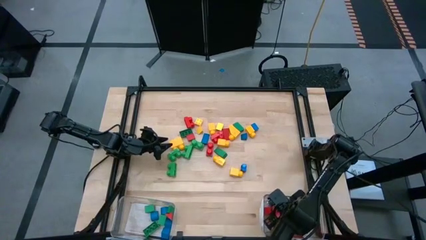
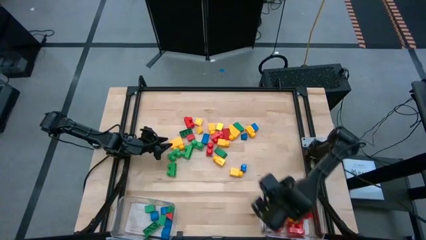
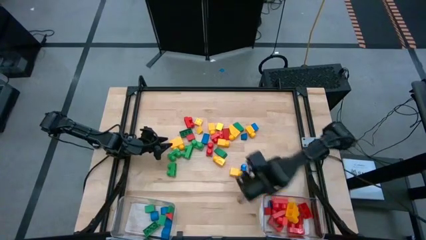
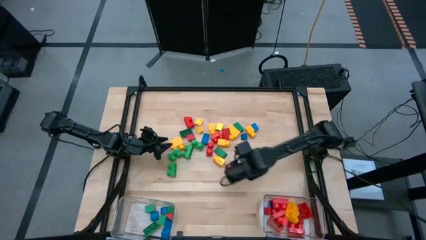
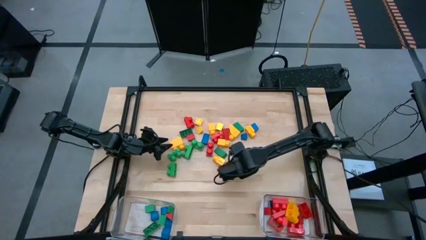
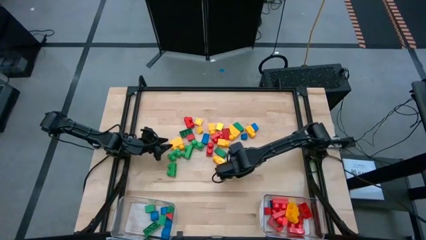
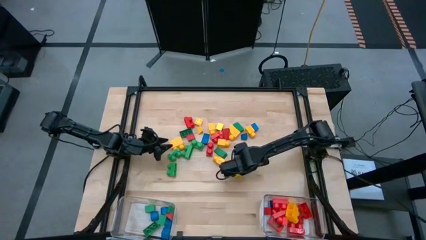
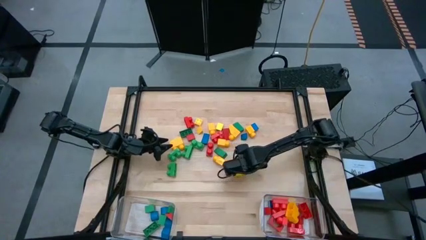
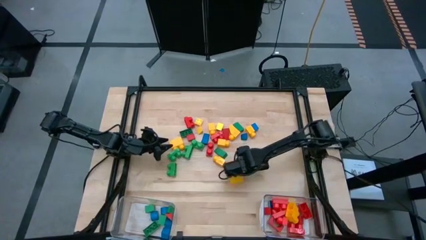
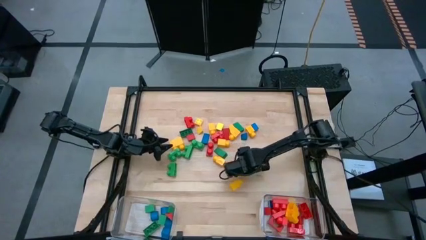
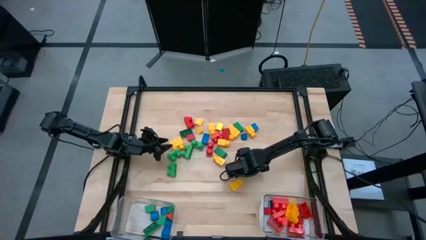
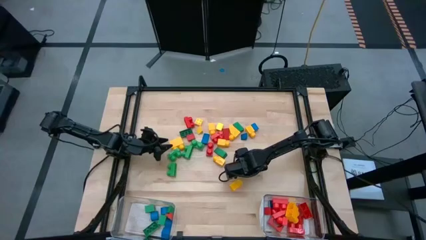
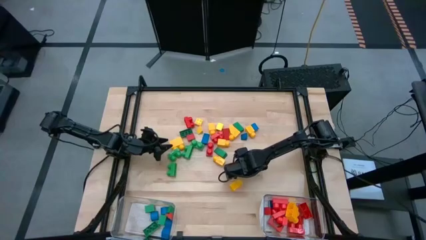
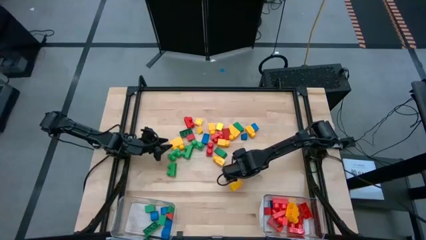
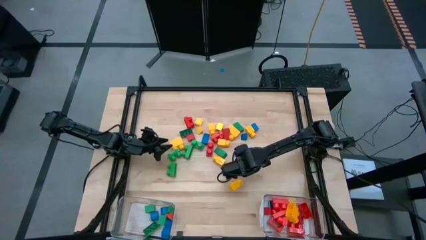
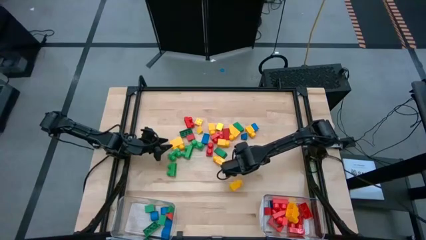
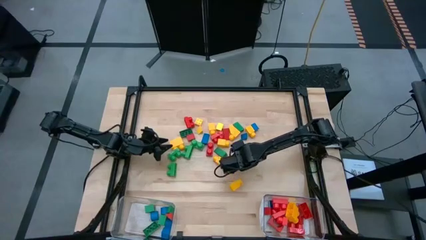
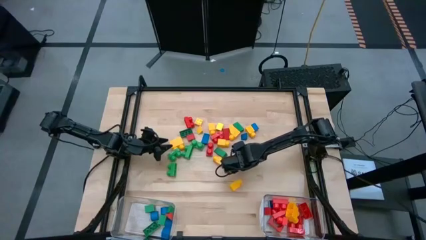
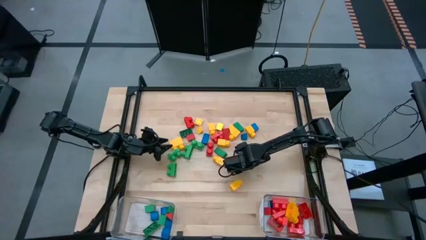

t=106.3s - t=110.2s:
Task: Sort blocks by size
Put the blue game piece into the left transparent bin

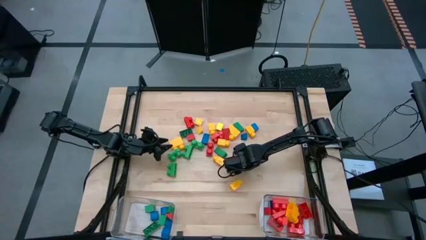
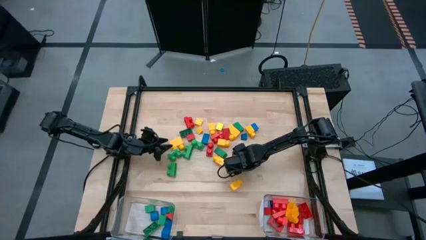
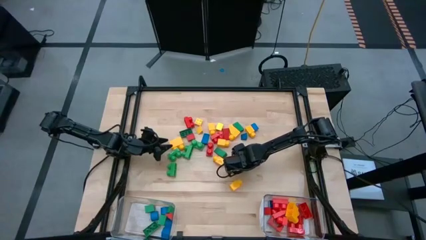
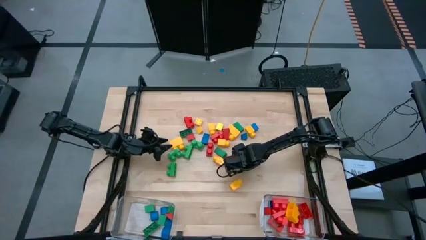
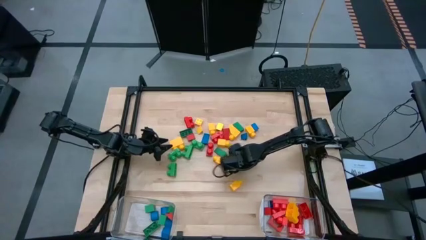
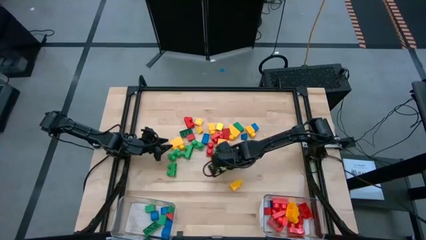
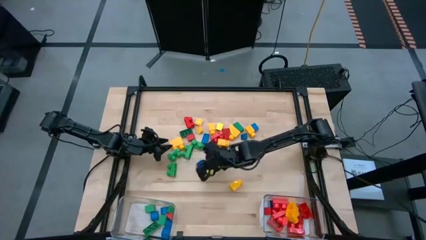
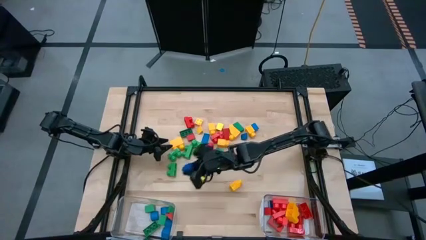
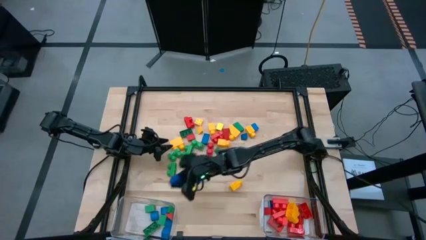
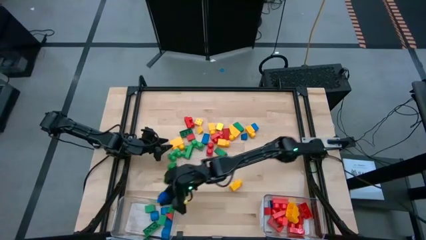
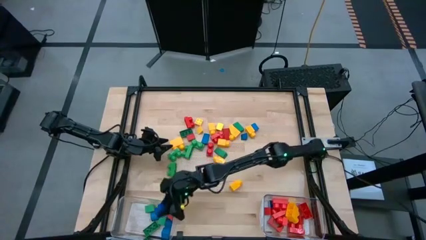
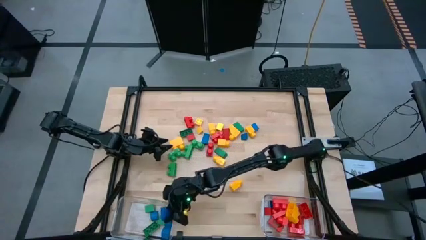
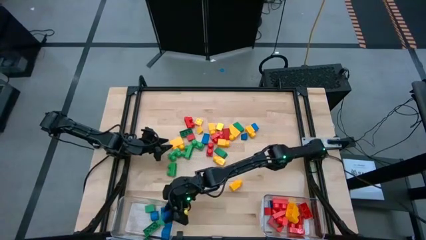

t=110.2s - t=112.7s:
Put the blue game piece into the left transparent bin

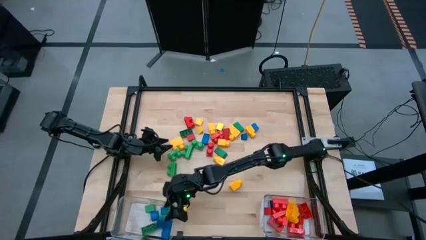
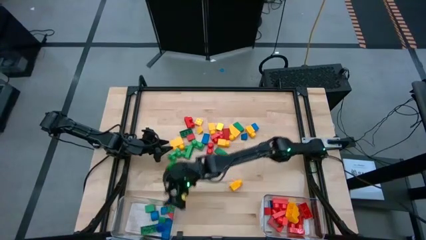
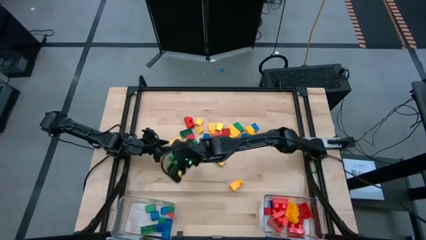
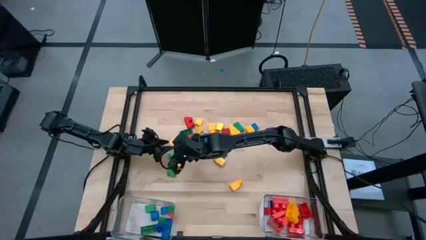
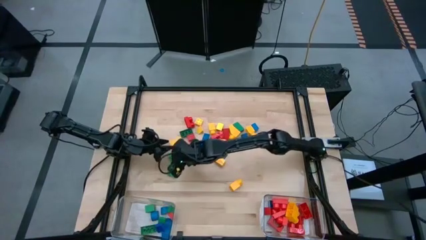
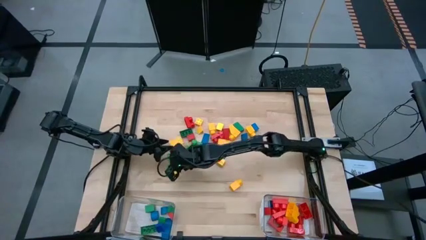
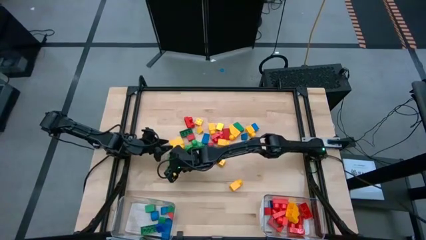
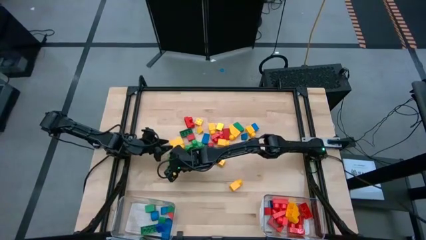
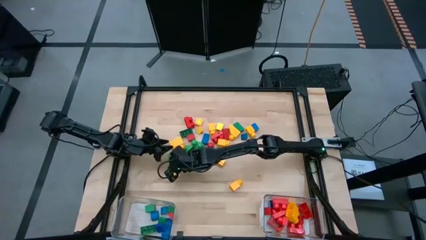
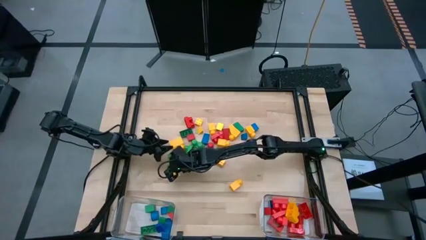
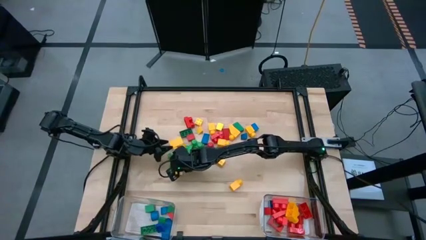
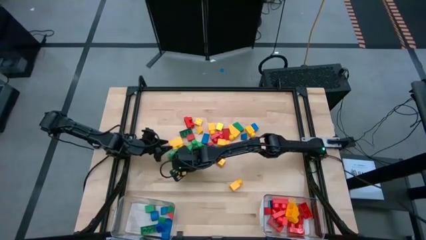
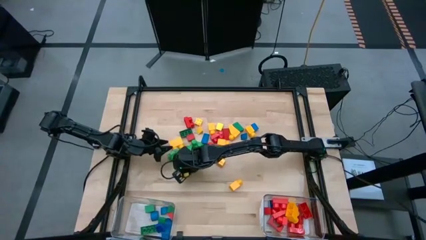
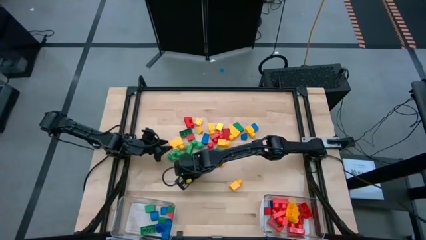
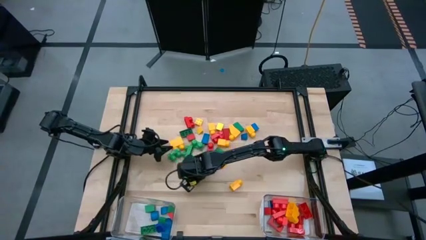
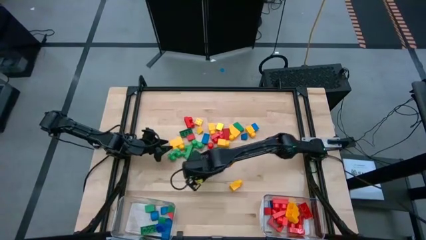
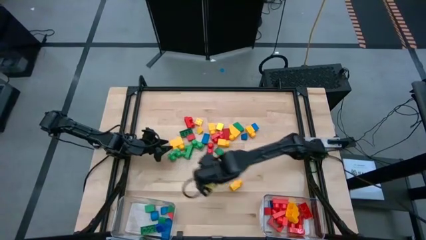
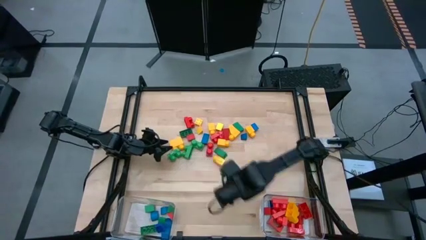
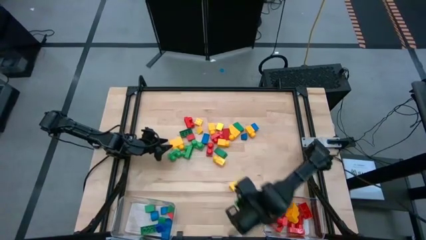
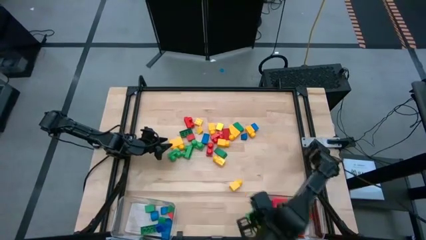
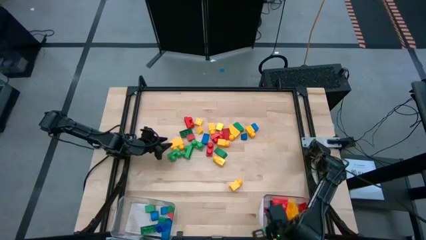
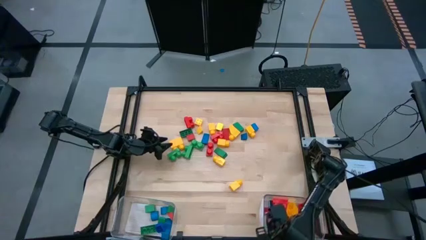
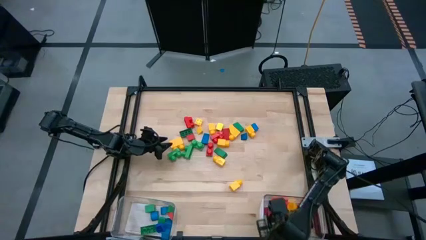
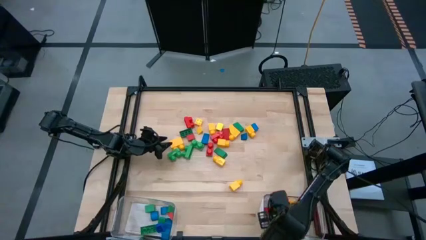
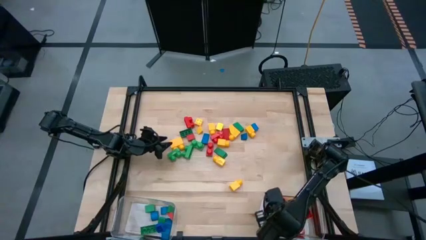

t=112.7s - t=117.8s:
Put the green game piece into the right transparent bin

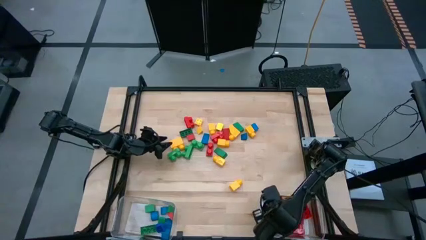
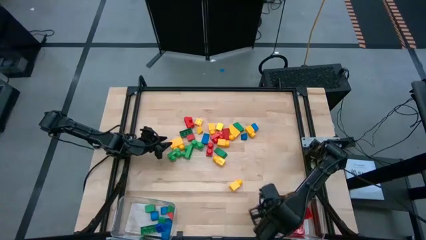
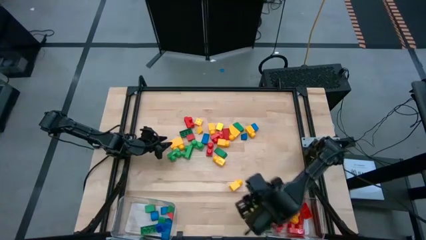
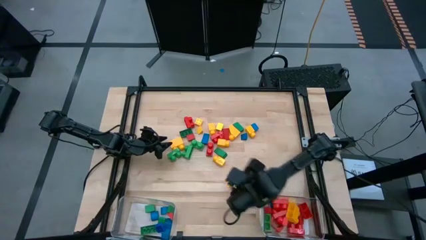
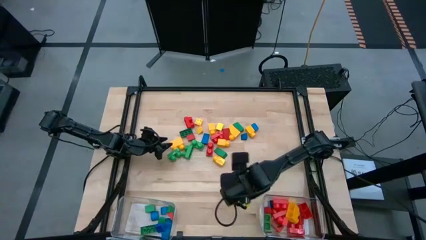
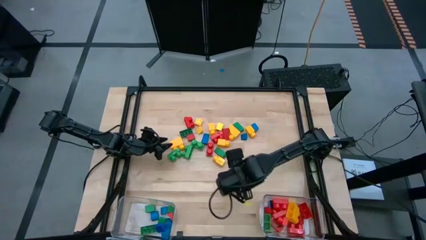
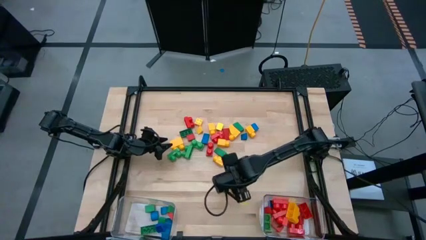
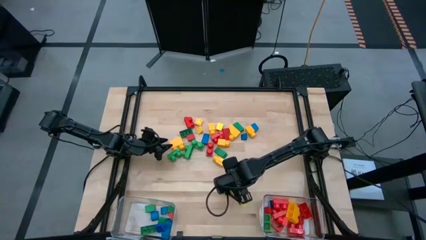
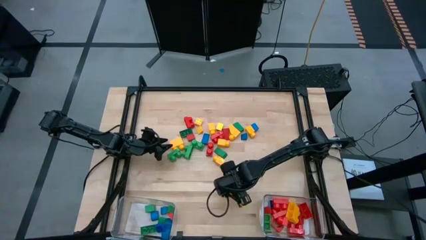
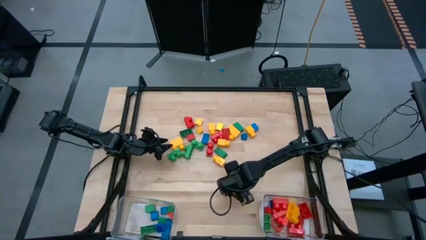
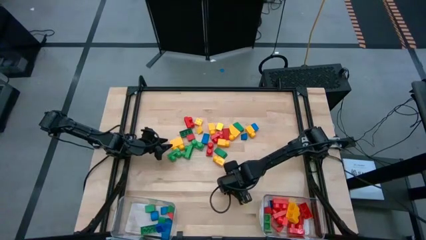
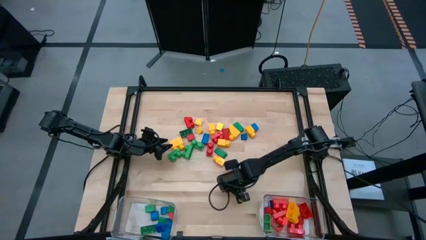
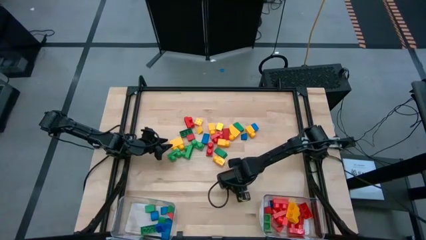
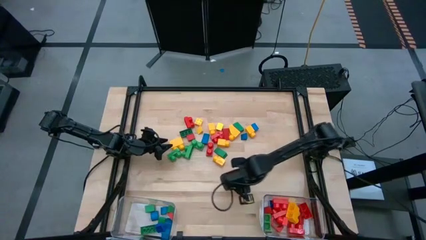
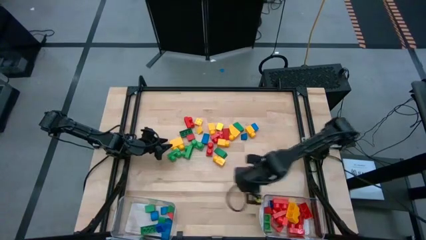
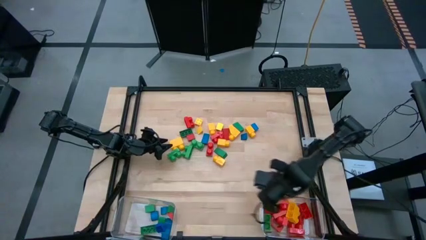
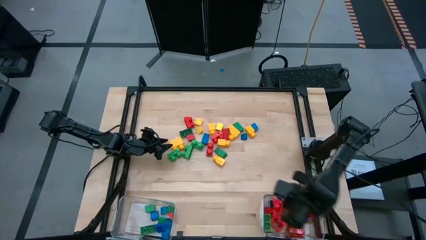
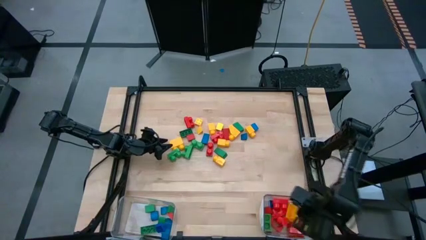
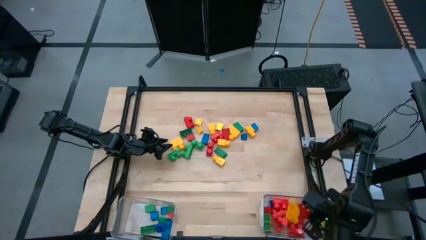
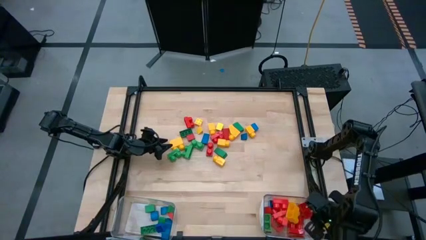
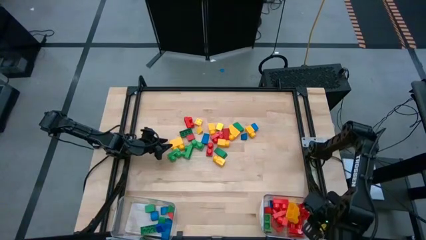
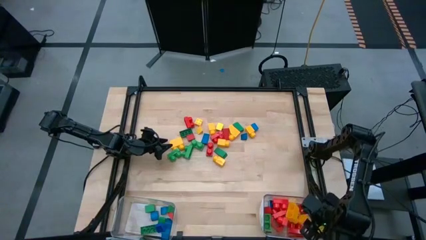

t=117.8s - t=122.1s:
Put the yellow game piece into the right transparent bin

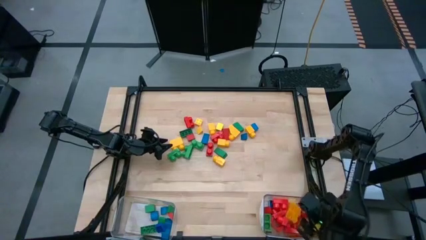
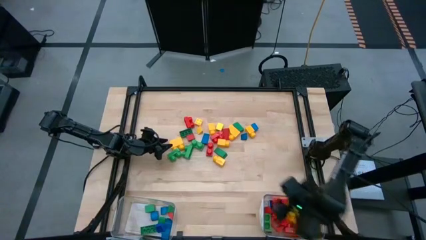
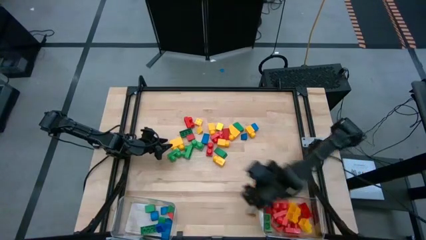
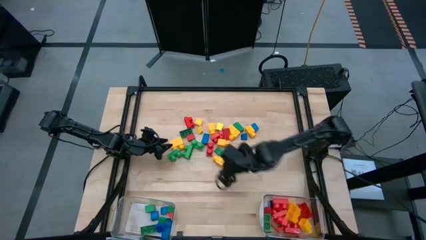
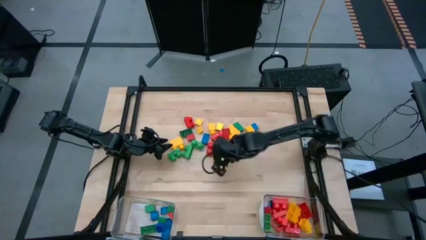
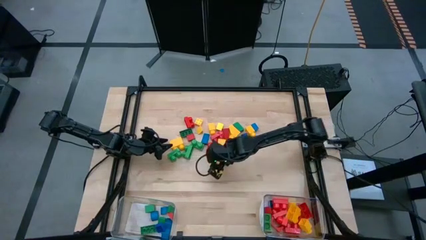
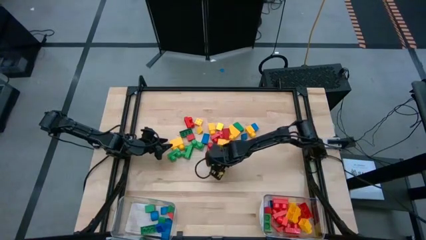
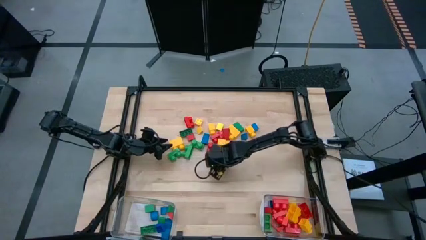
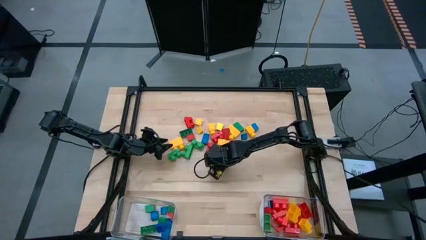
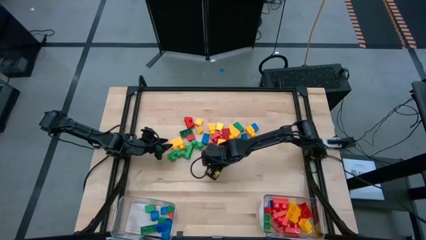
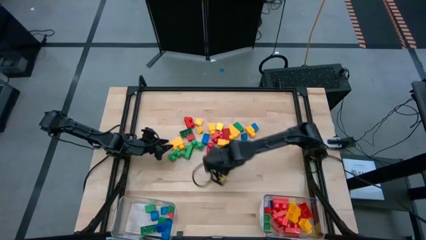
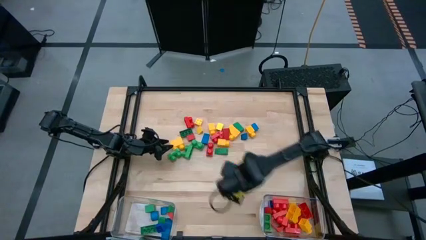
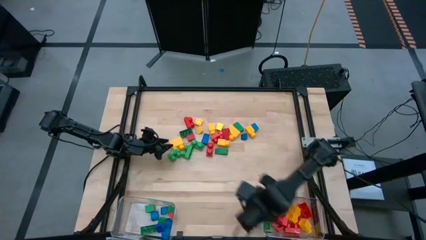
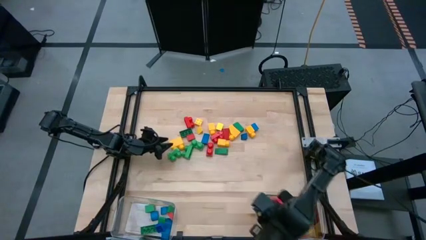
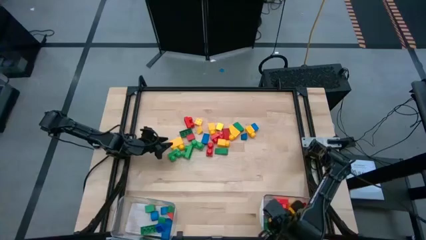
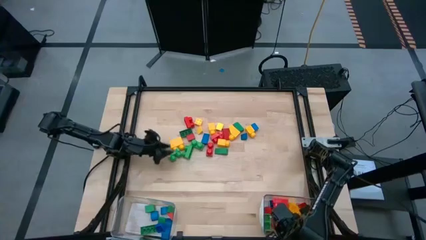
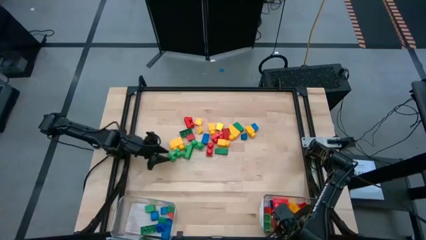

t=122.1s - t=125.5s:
Put the yellow game piece into the right transparent bin
